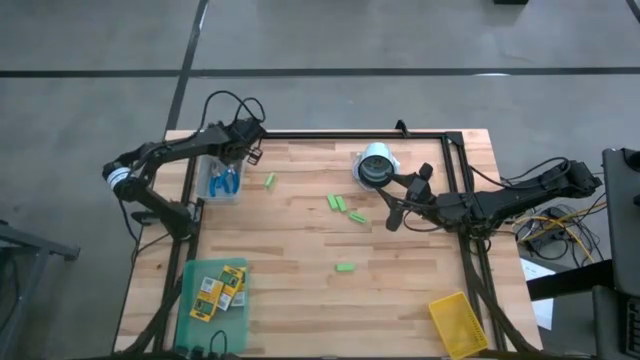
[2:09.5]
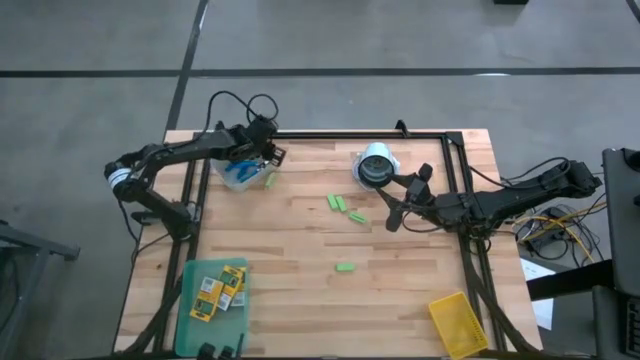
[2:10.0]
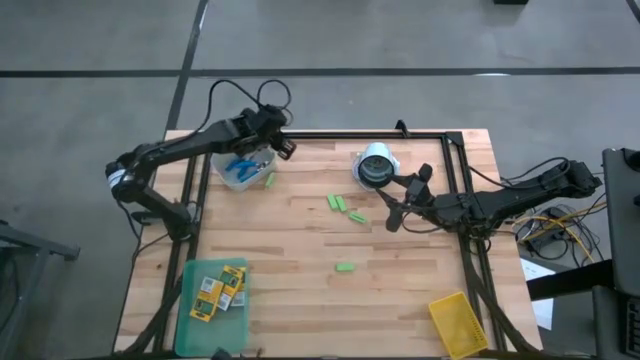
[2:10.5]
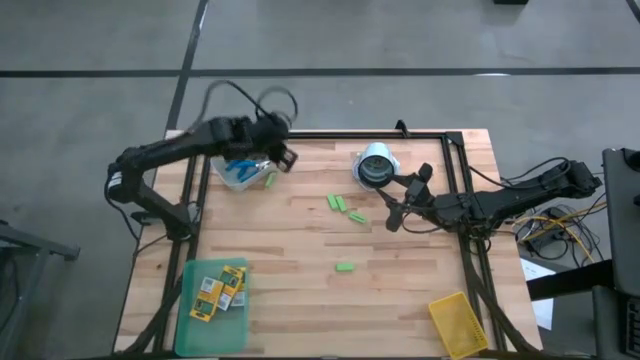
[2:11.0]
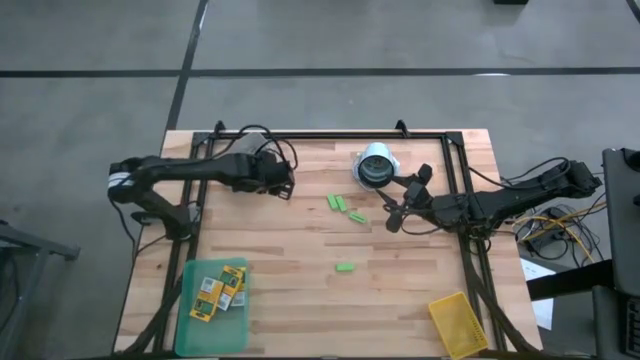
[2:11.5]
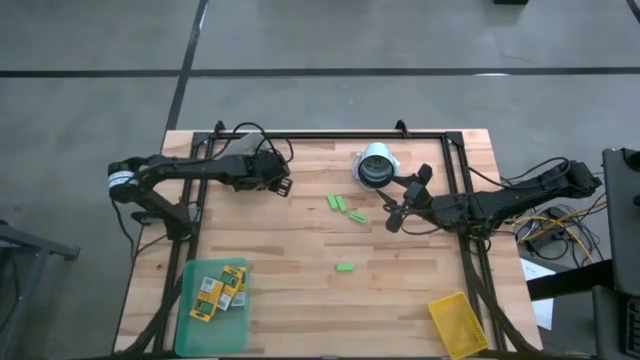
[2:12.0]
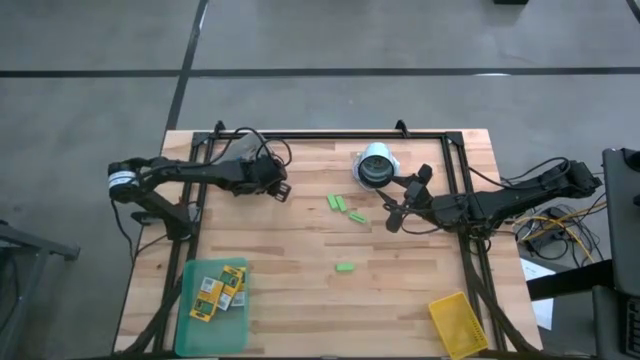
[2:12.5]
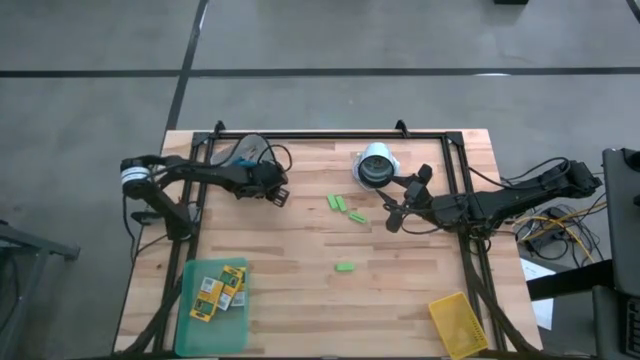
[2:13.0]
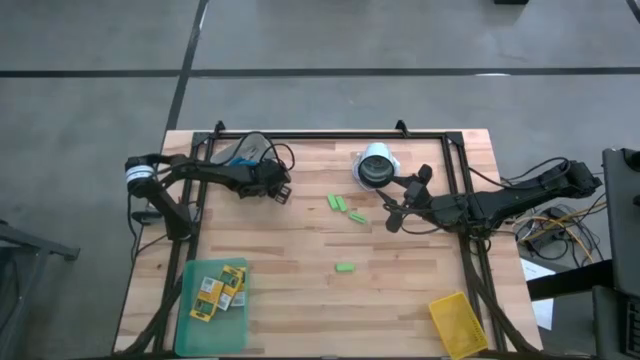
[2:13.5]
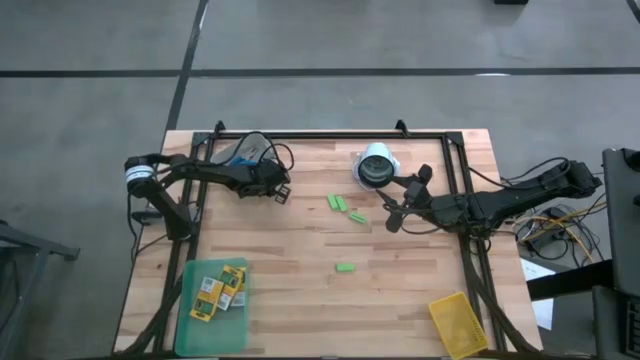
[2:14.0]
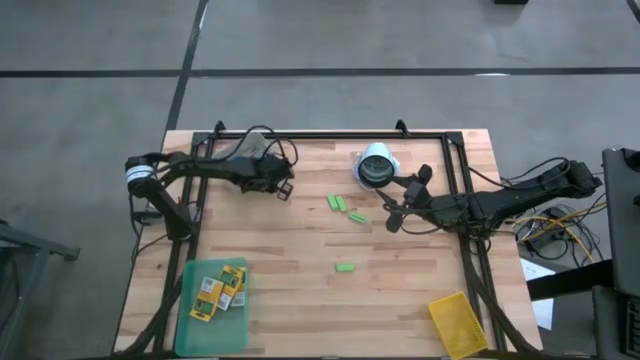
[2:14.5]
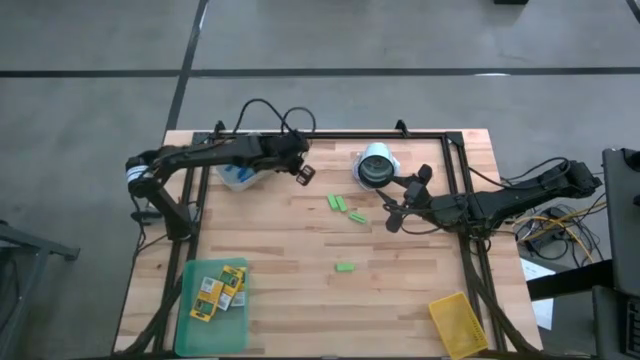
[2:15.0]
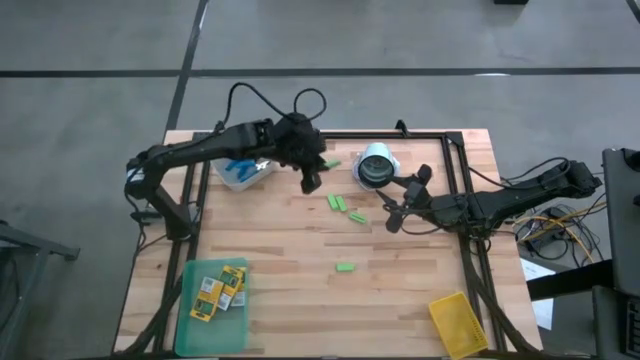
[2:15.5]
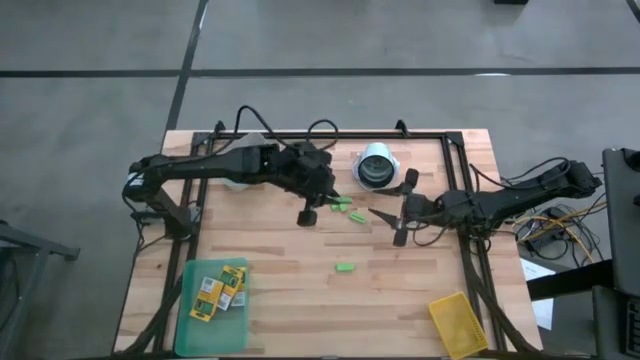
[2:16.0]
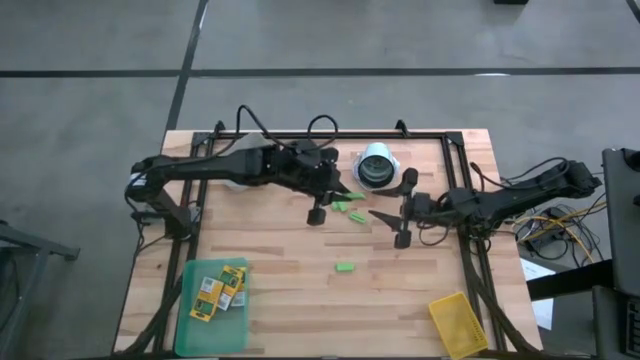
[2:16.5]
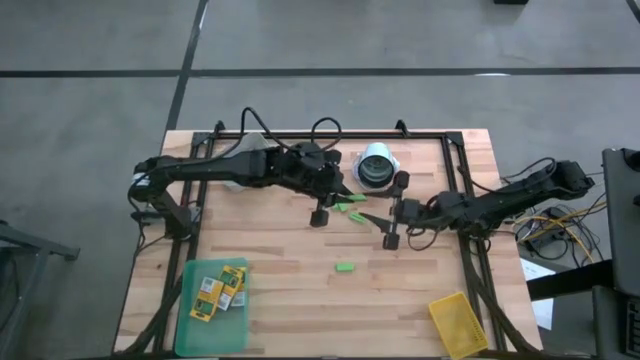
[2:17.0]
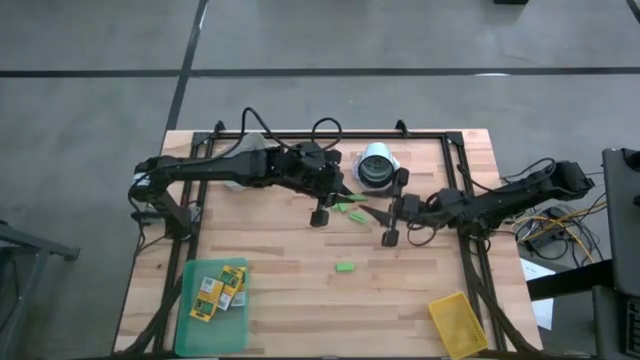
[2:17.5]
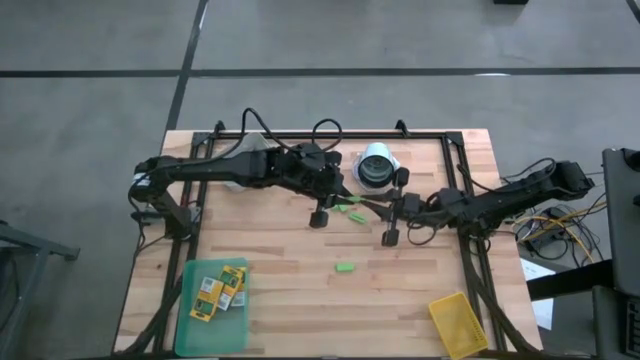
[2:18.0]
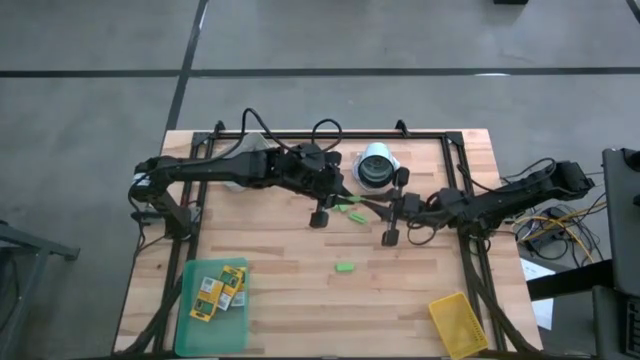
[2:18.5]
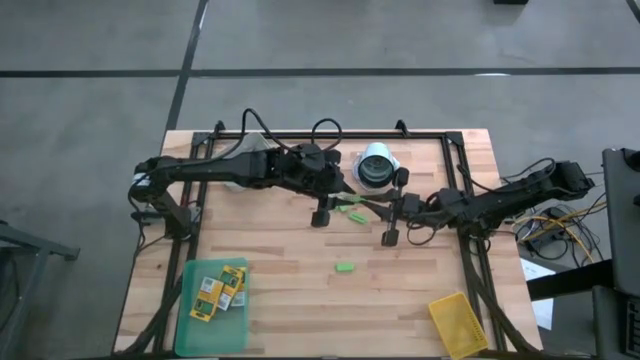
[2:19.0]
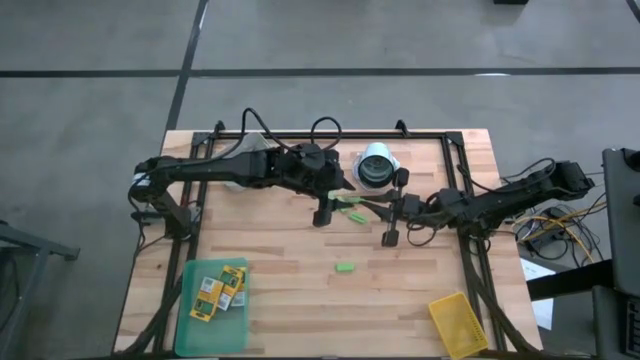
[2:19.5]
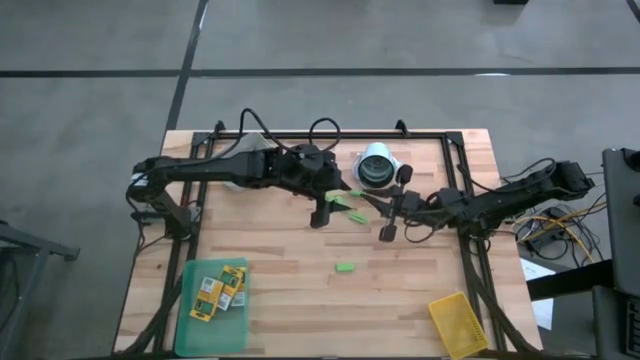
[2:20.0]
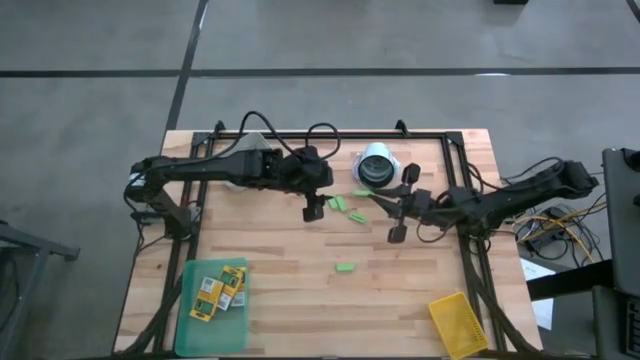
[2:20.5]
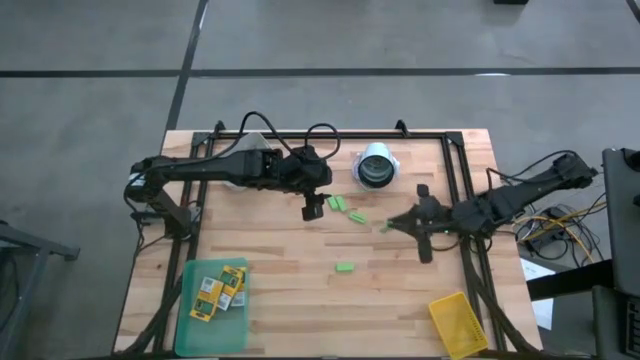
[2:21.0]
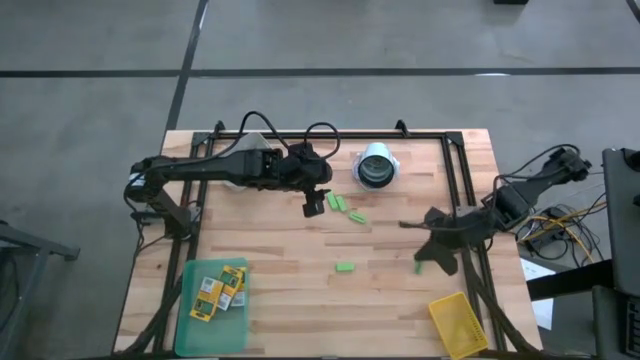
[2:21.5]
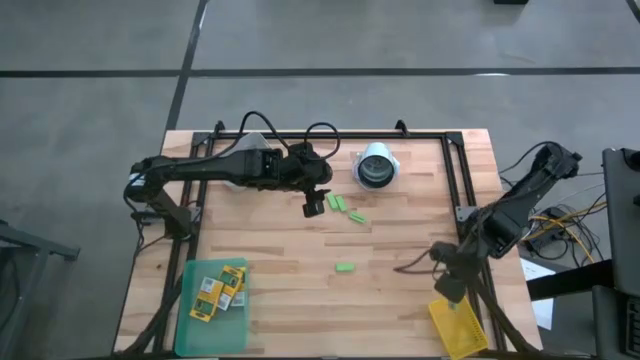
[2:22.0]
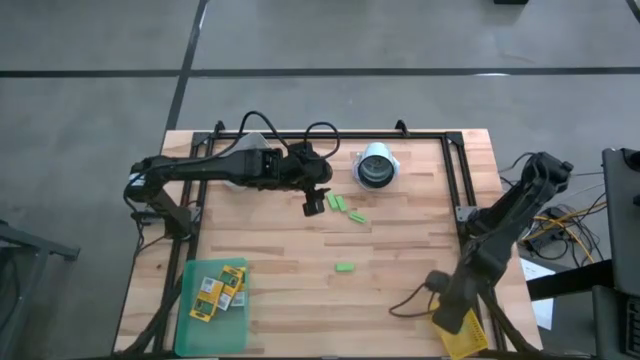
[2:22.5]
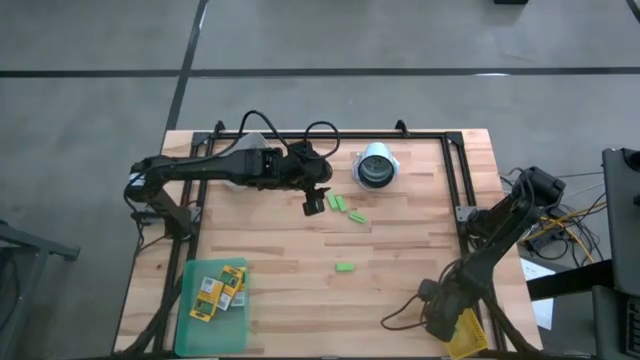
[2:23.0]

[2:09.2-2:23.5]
Task: Pick & Place School Supplies
Put the green eraser into the yellow bin

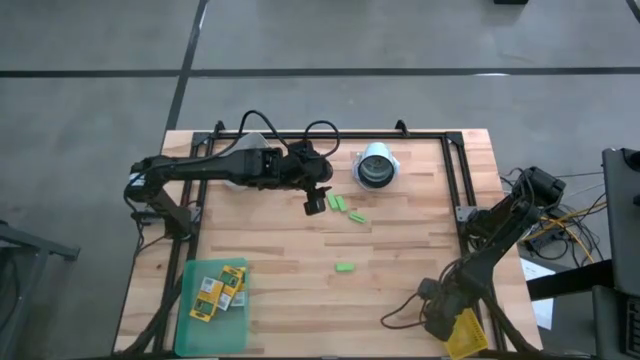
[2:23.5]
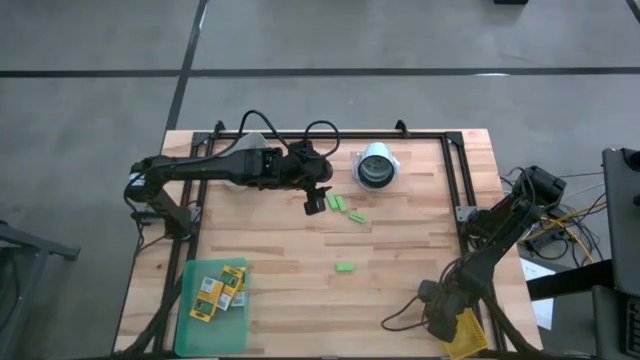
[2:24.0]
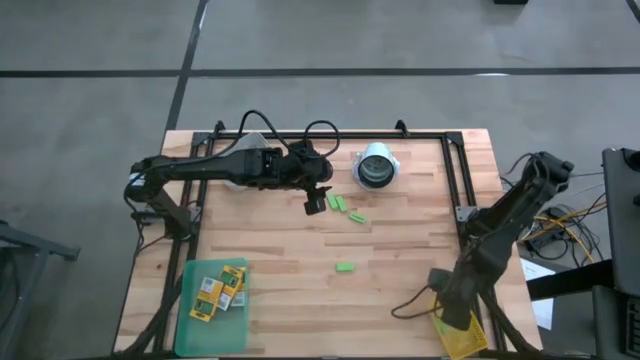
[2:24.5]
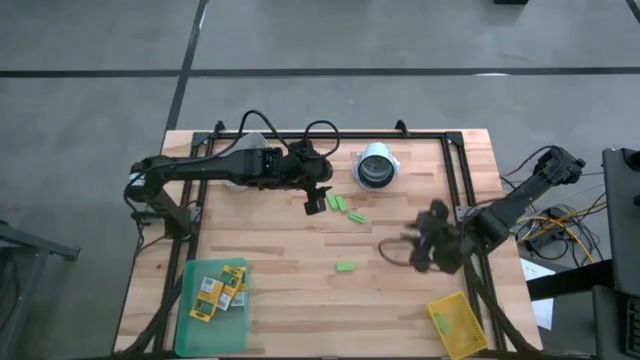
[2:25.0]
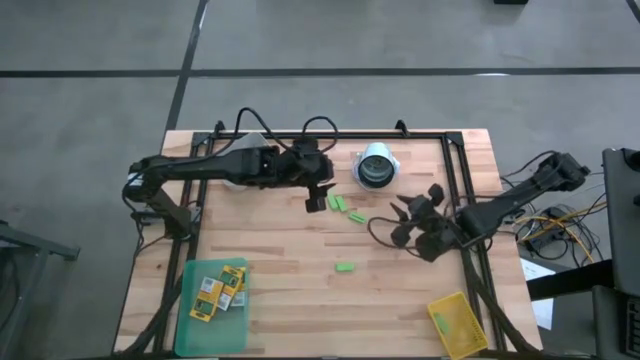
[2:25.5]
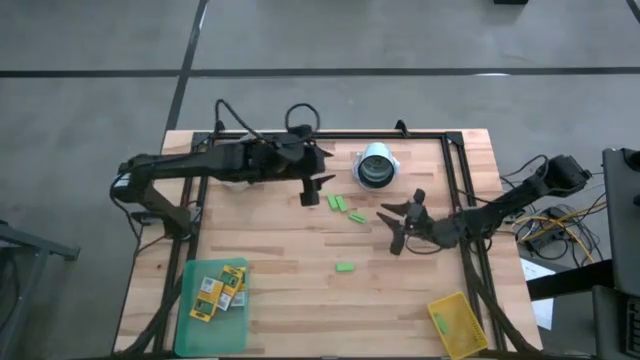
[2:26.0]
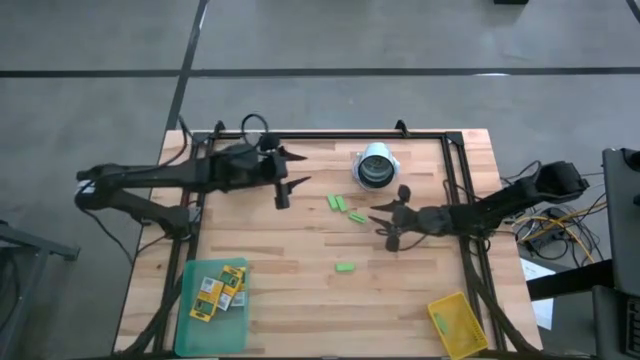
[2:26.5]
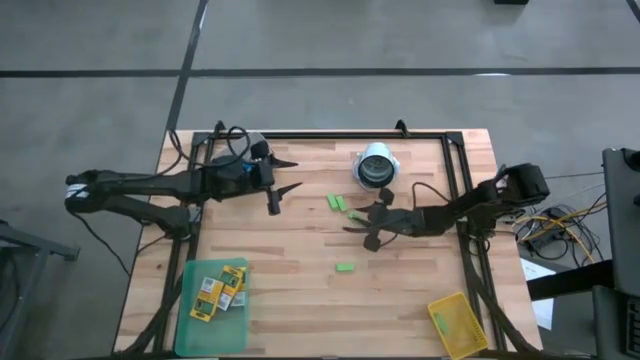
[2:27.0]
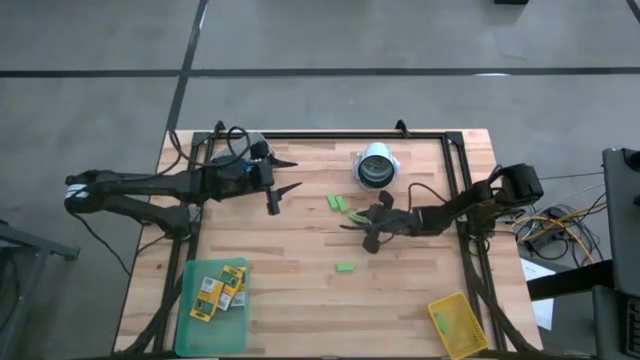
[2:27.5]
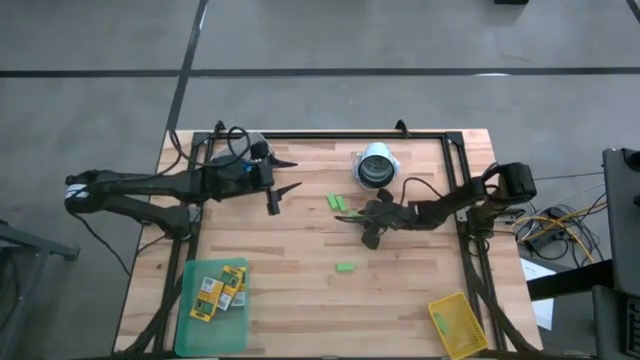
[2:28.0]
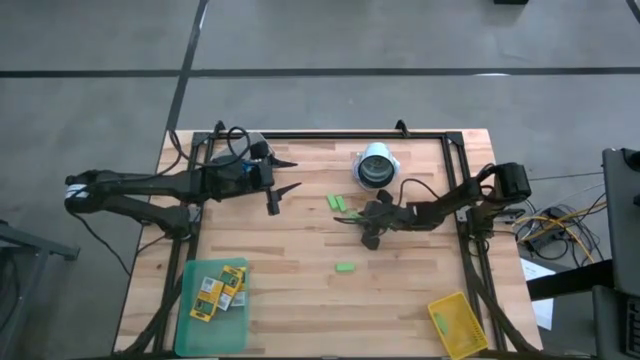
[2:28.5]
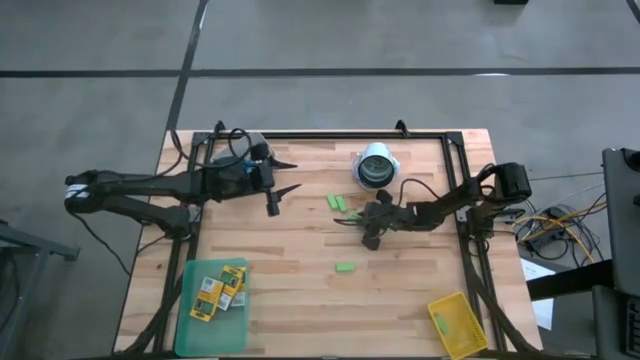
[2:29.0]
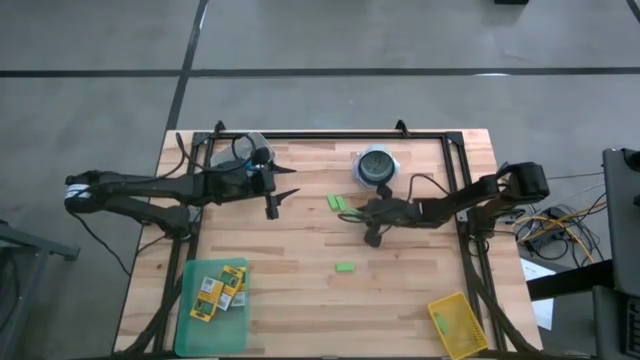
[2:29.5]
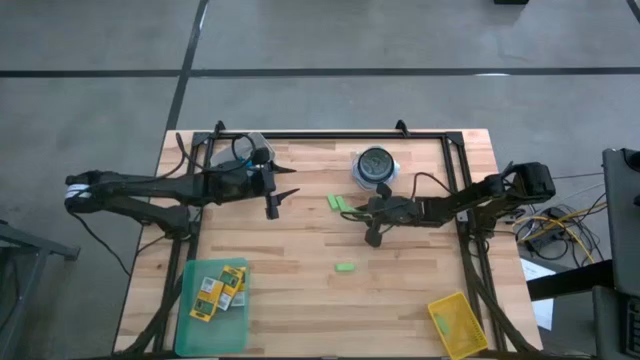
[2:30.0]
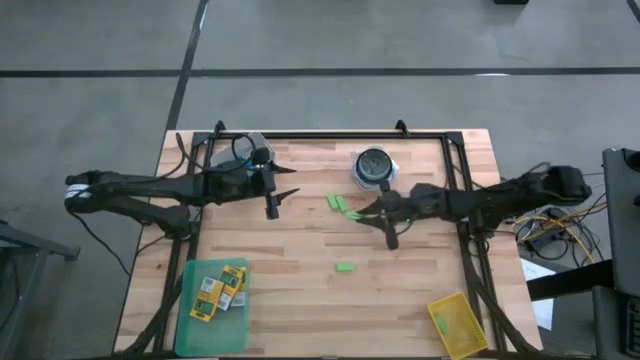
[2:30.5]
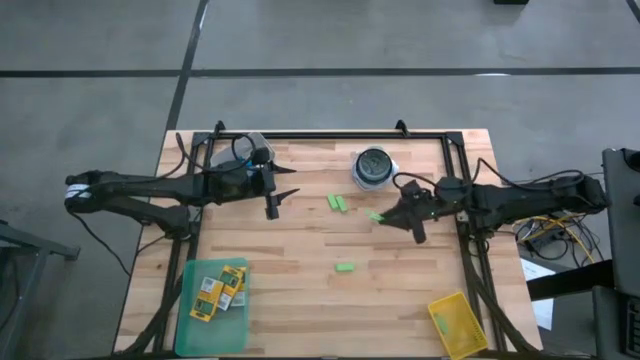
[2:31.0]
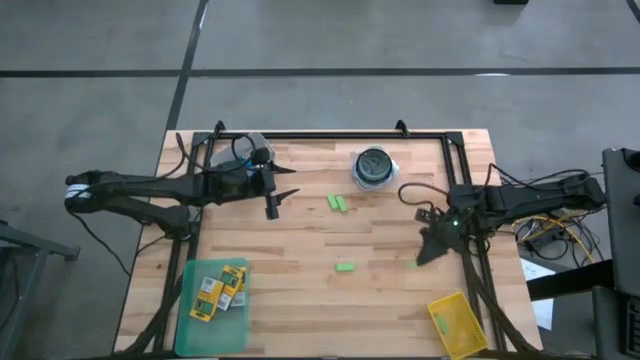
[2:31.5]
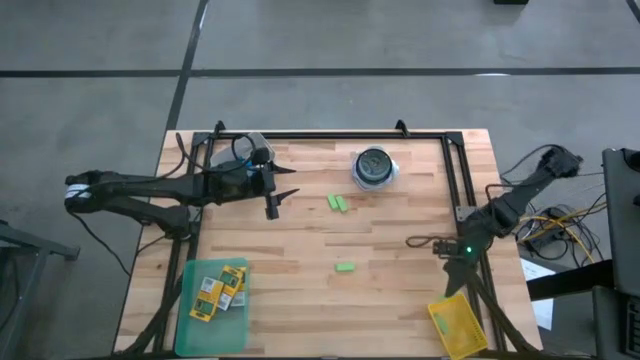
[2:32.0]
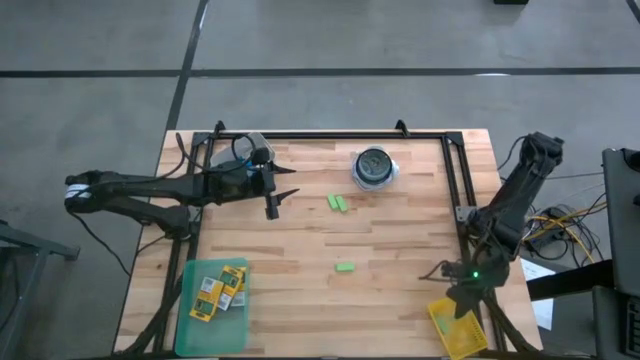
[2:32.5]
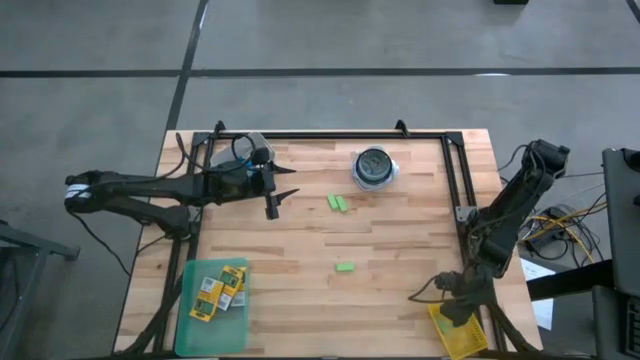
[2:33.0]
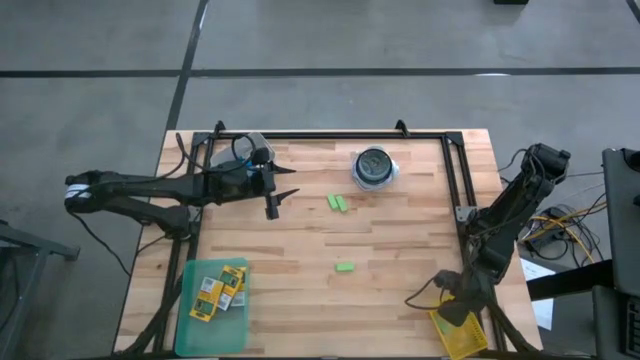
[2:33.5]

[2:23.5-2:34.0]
Put the green eraser into the yellow bin
